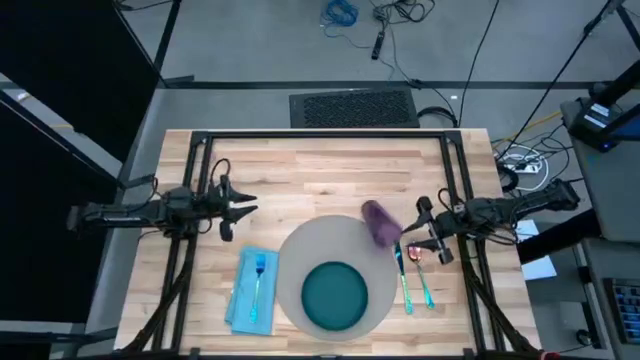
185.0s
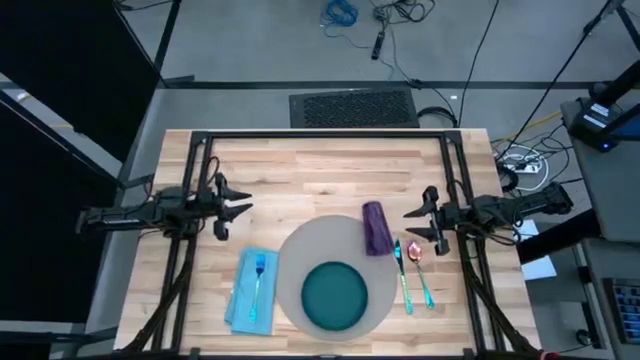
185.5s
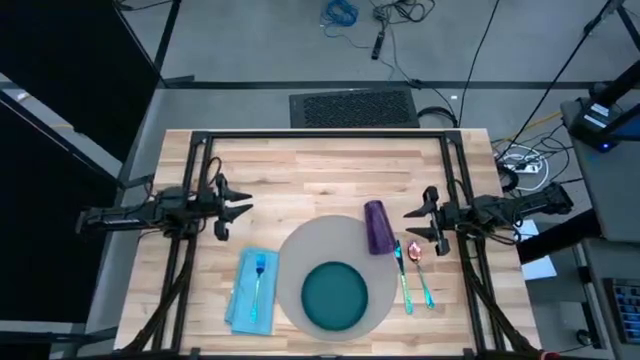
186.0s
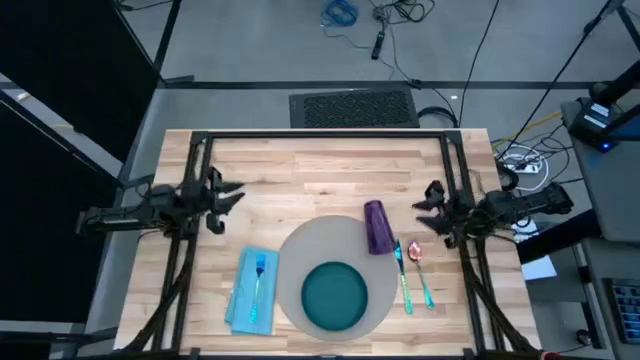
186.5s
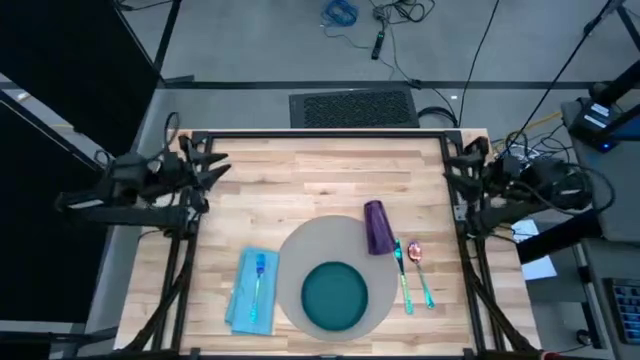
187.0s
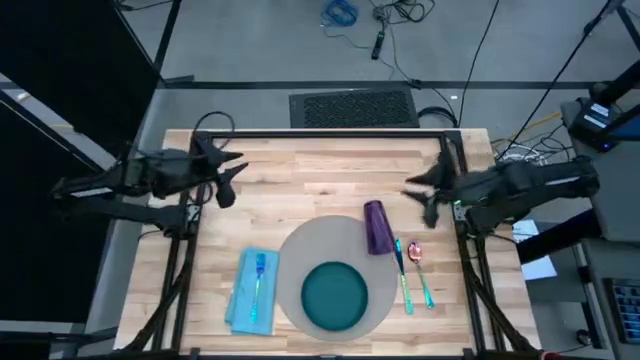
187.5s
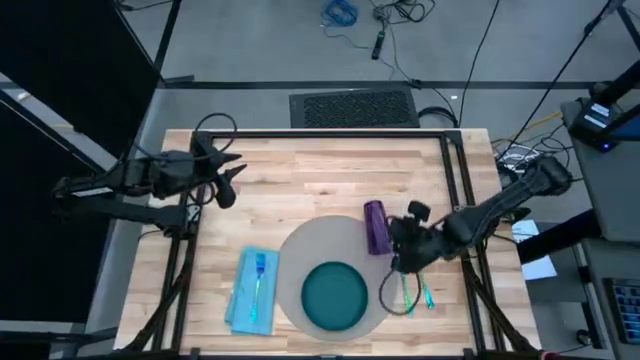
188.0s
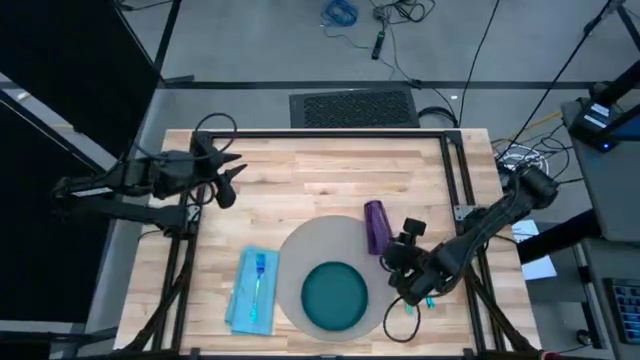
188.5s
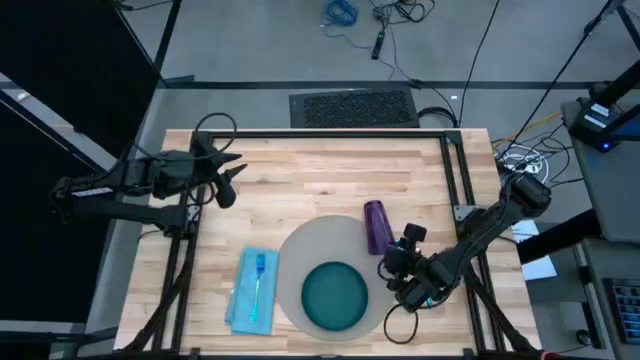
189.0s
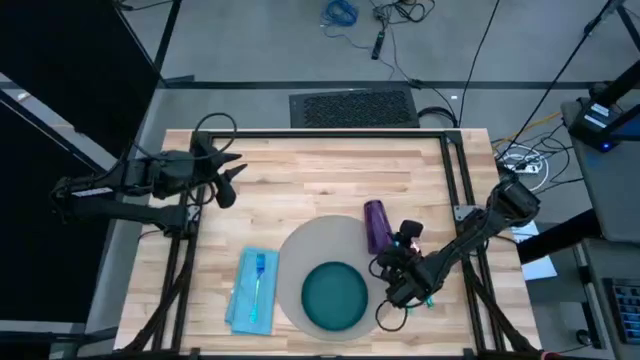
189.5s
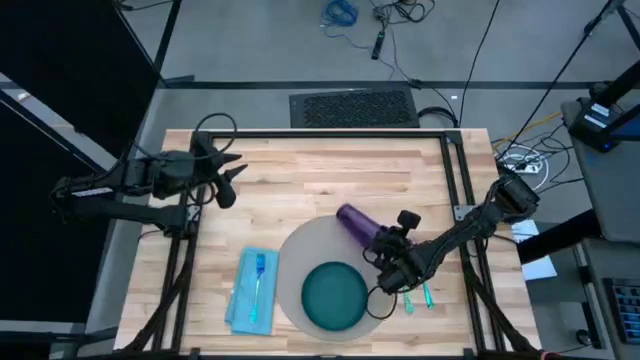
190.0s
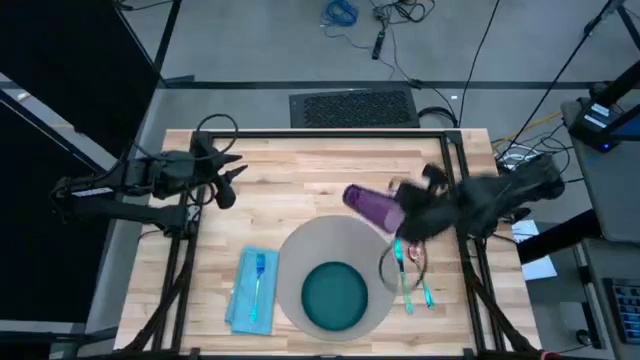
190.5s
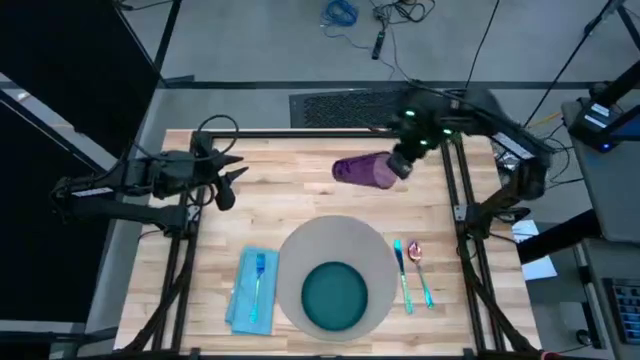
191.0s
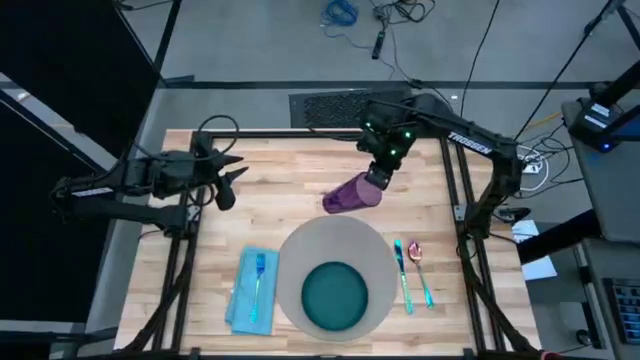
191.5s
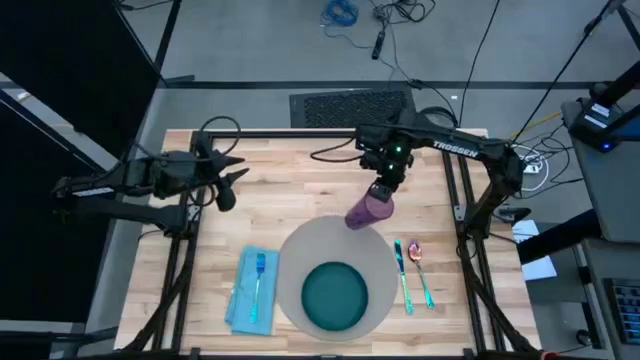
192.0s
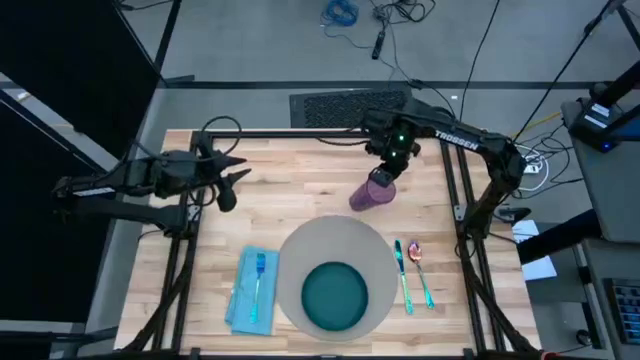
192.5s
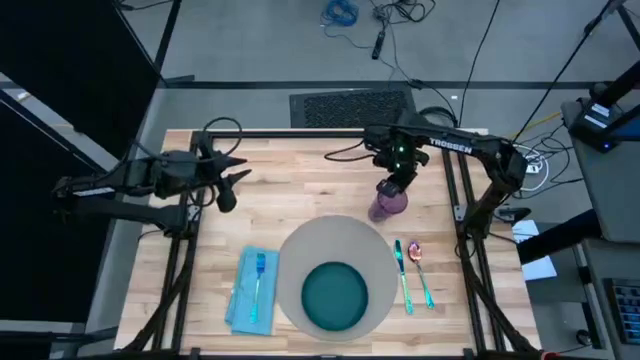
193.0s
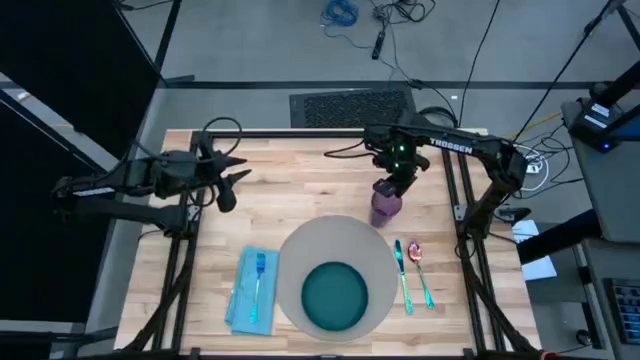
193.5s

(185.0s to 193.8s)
Task: Set table place
Put the purple cup on the top of the gray mat

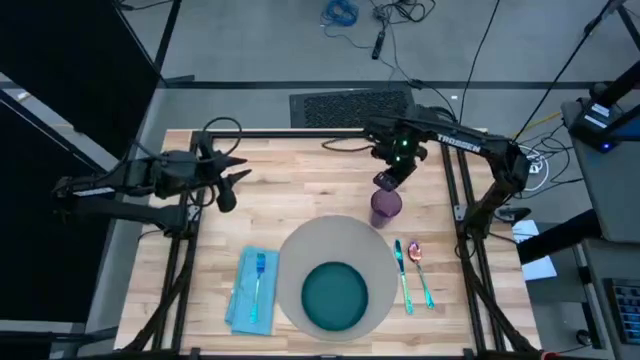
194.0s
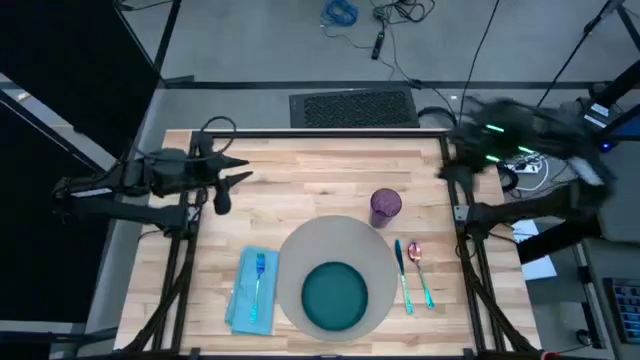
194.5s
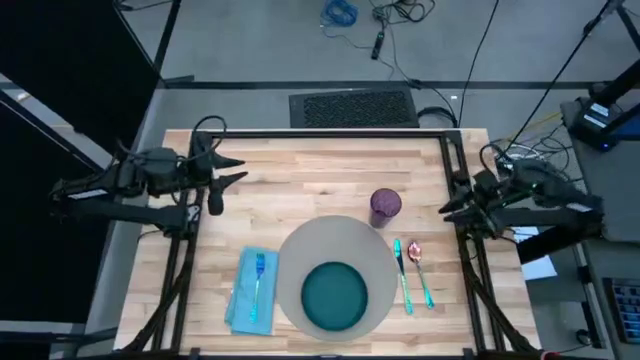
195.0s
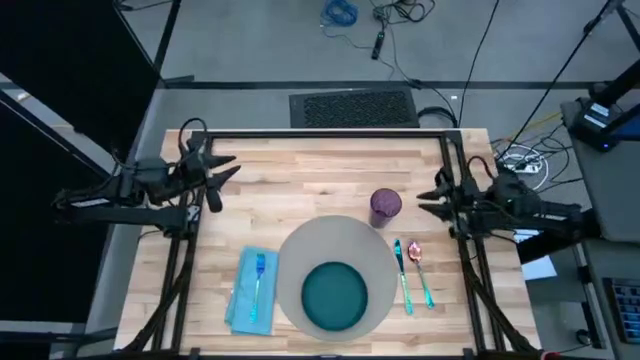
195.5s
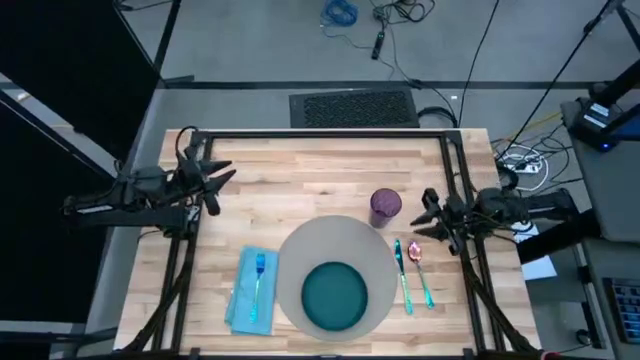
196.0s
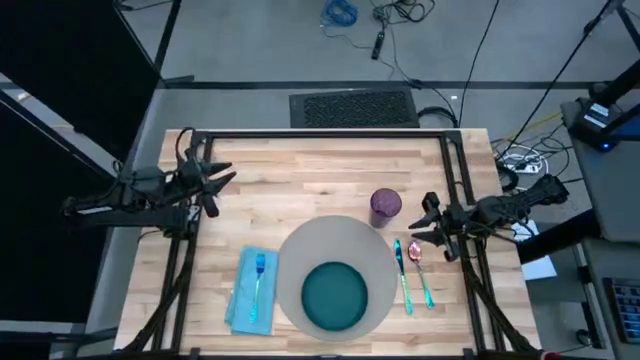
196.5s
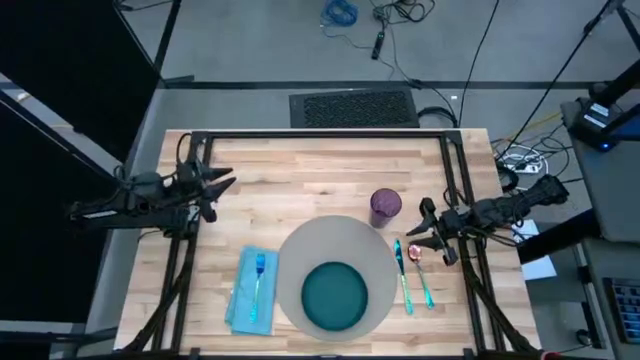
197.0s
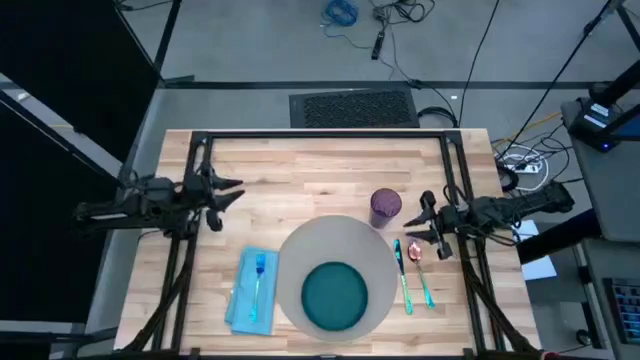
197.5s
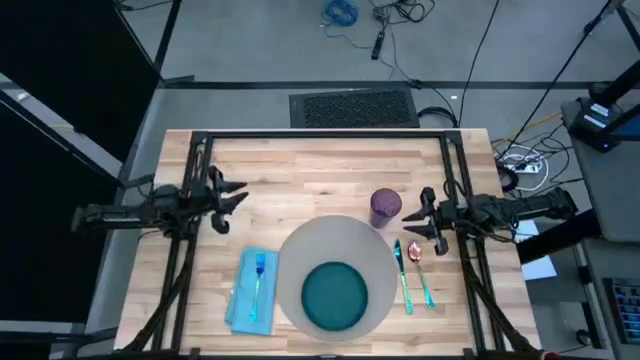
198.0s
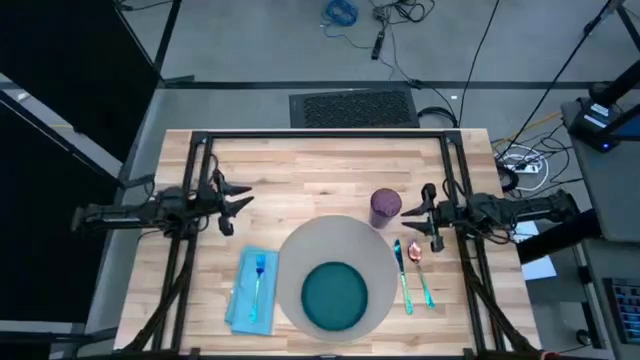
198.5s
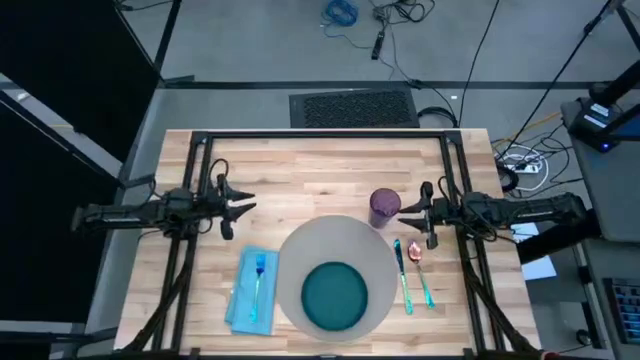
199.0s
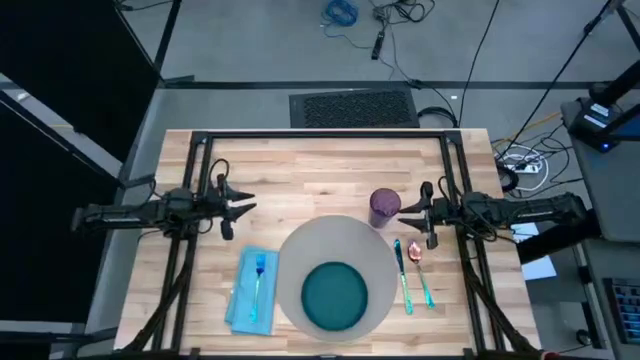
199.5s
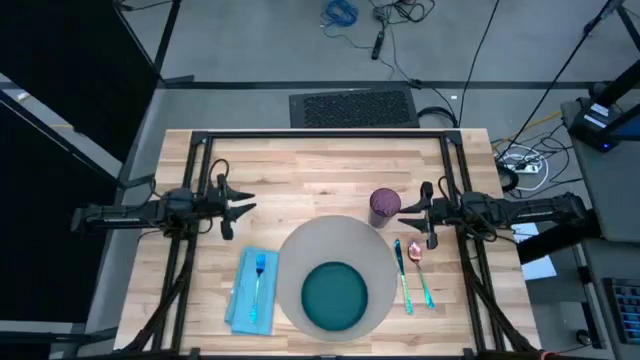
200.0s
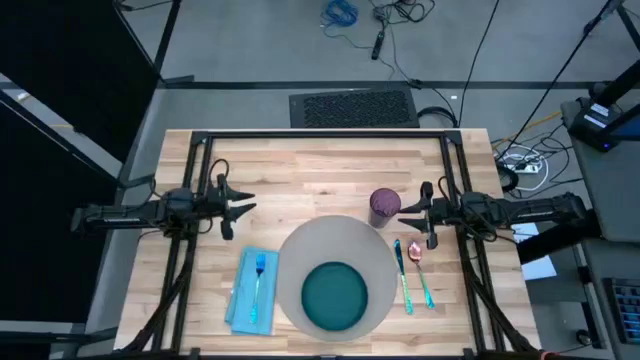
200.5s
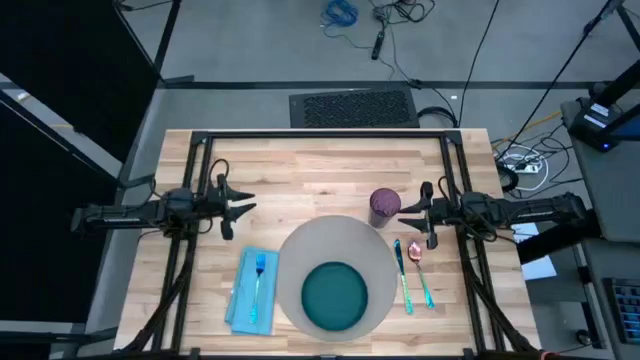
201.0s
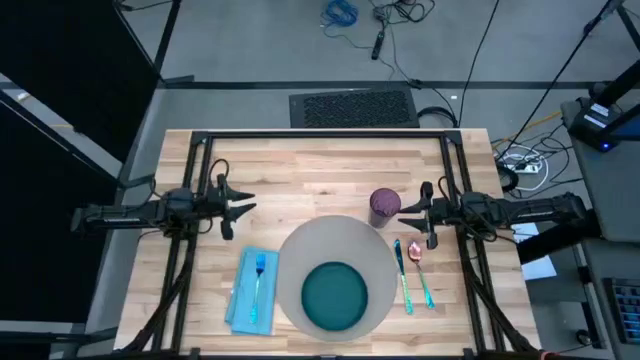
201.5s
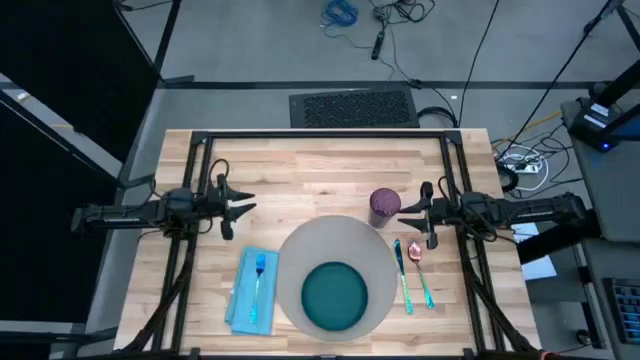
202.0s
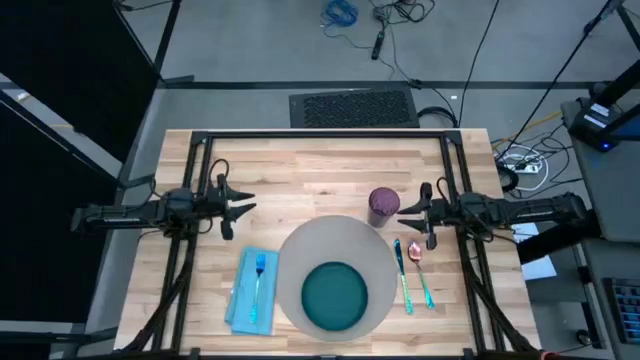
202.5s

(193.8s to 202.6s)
Return to Home Position

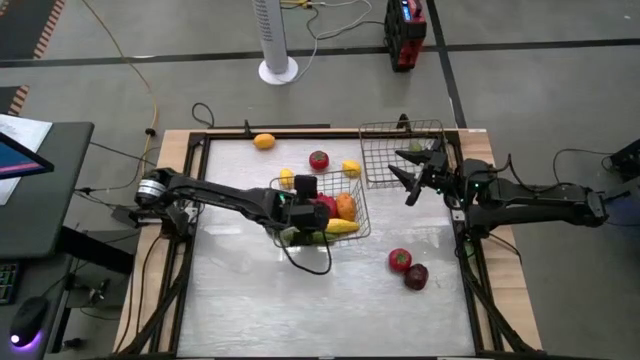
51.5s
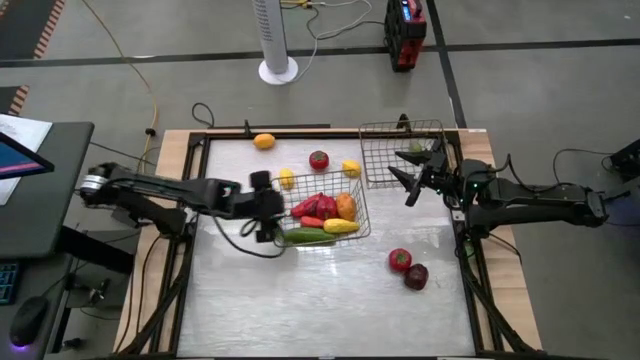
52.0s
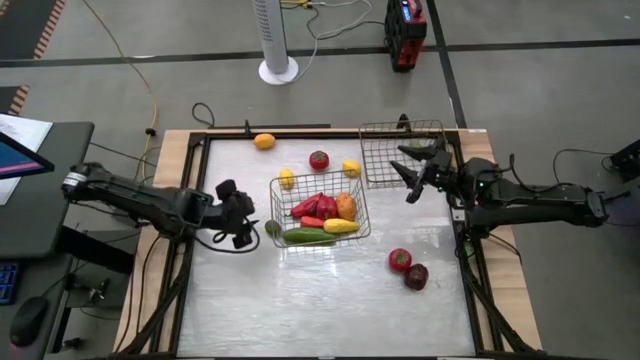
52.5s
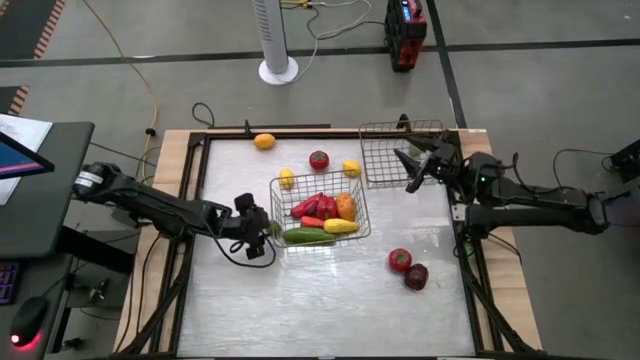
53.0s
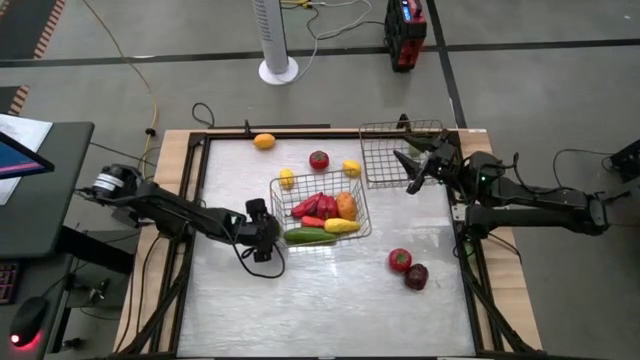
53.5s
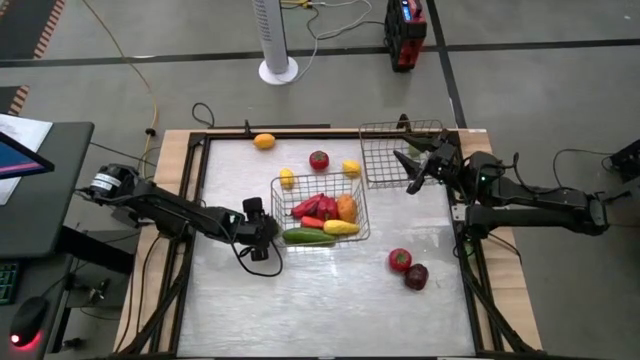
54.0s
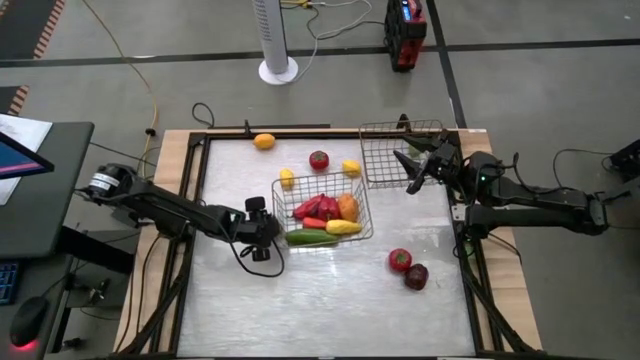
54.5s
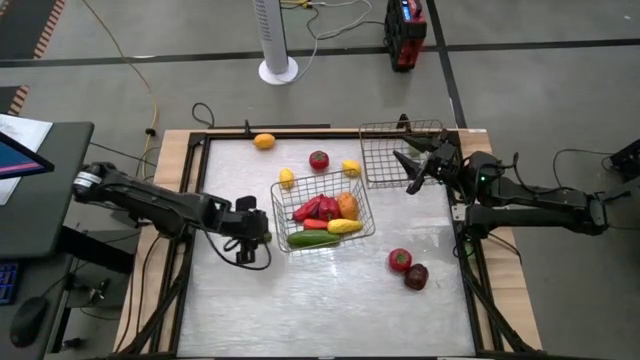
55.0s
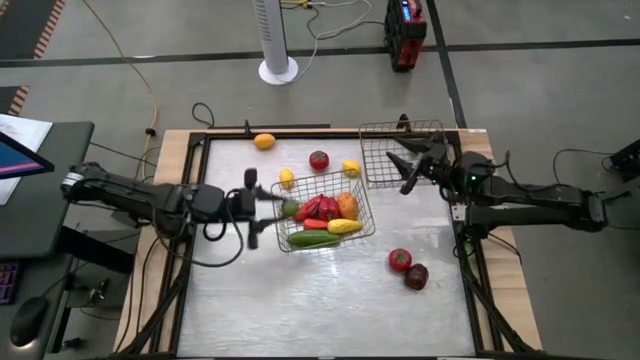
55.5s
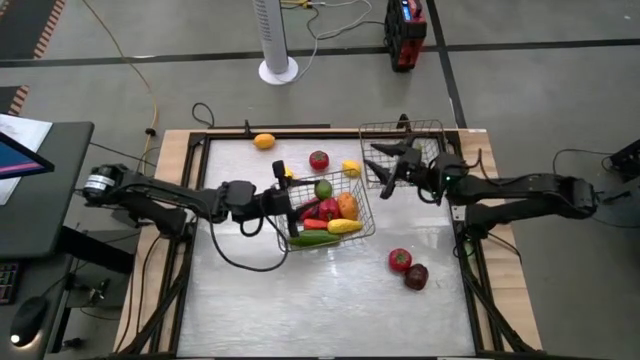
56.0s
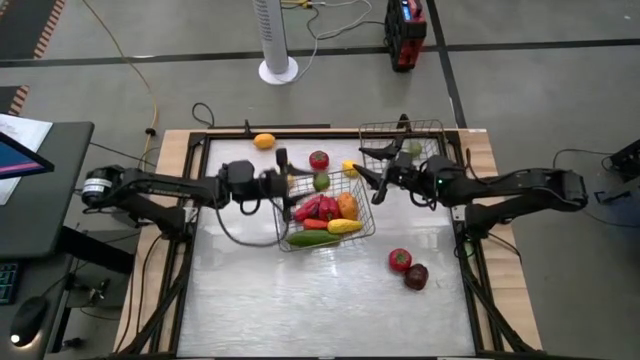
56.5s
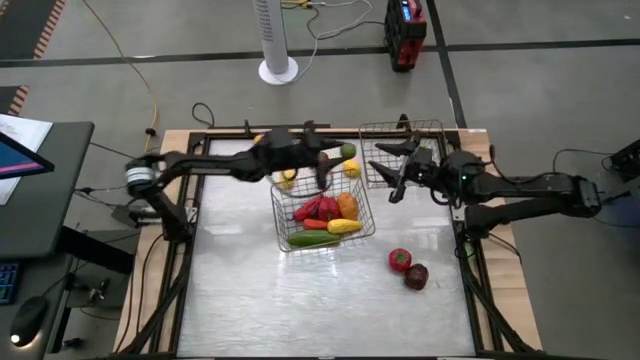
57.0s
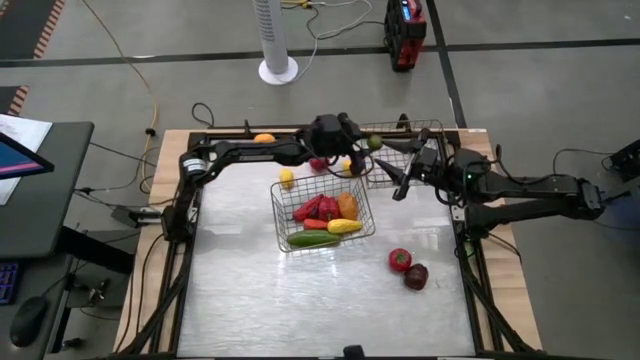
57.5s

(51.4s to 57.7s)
Task: Sort produce into baskets
Put the green lime into the right wire basket
